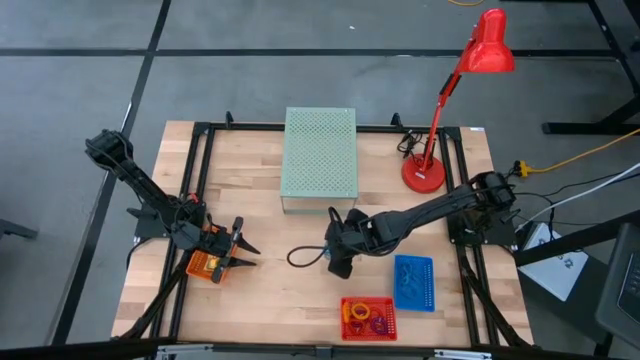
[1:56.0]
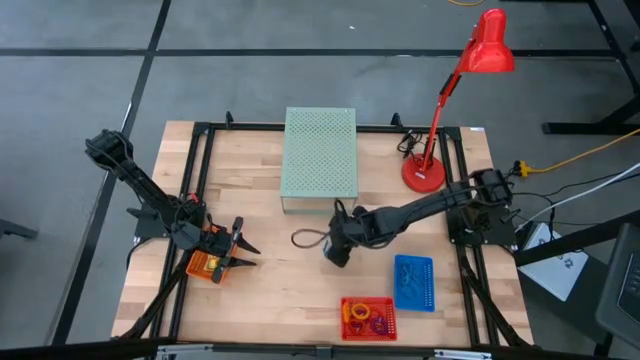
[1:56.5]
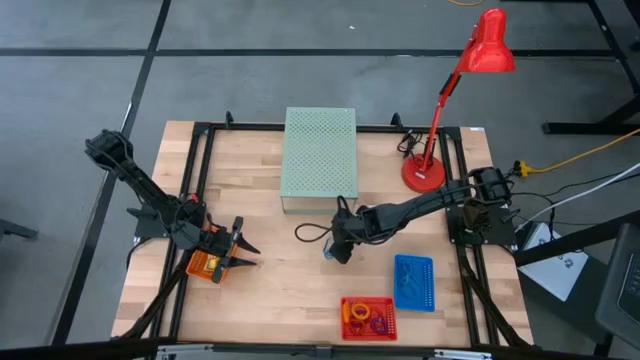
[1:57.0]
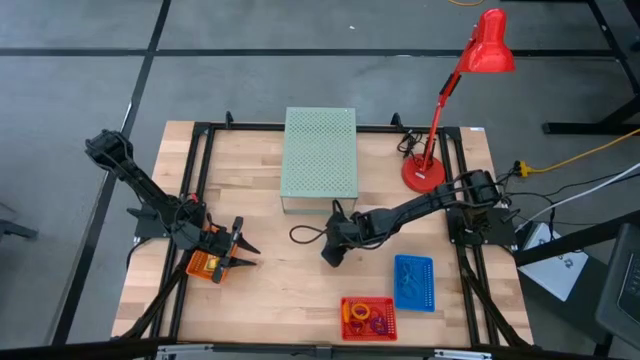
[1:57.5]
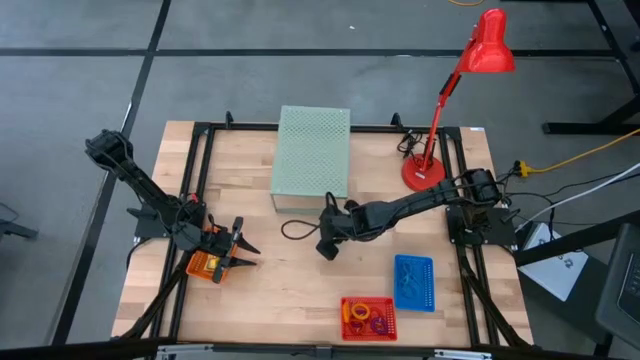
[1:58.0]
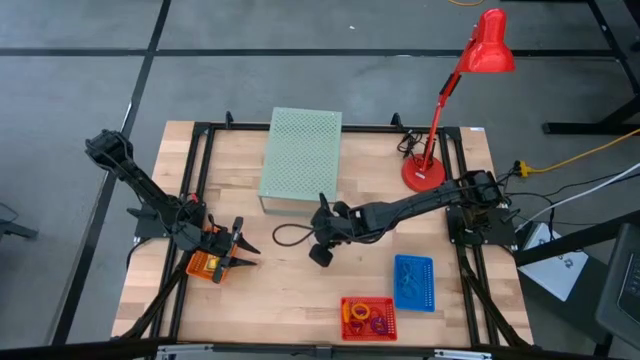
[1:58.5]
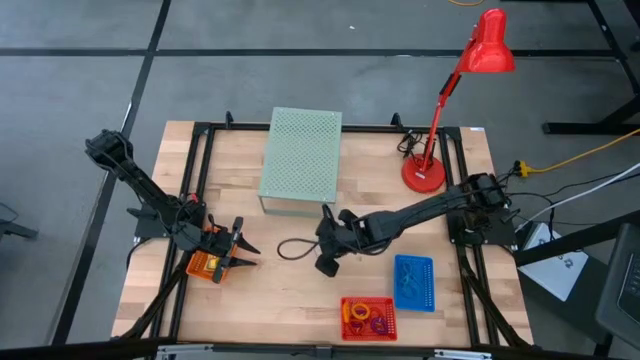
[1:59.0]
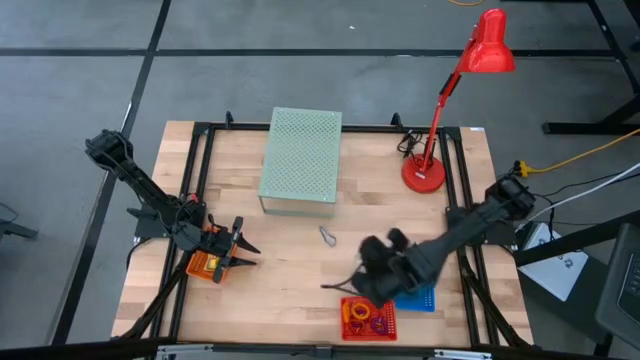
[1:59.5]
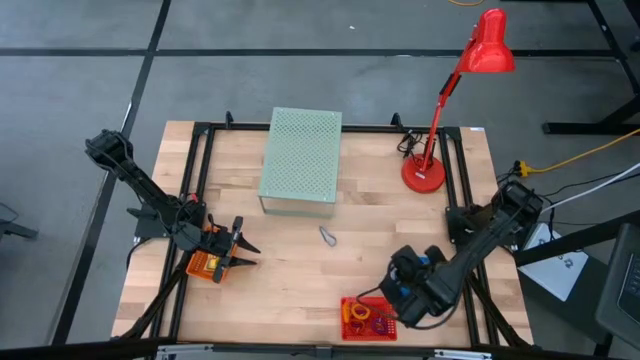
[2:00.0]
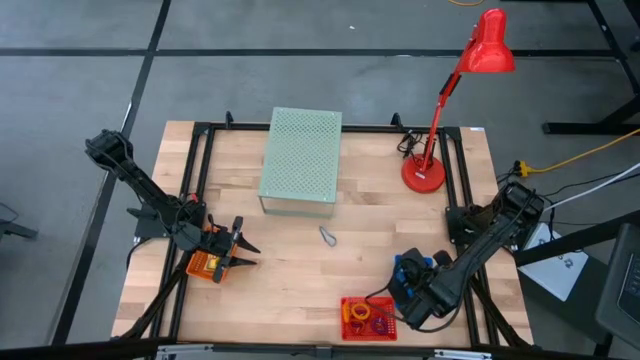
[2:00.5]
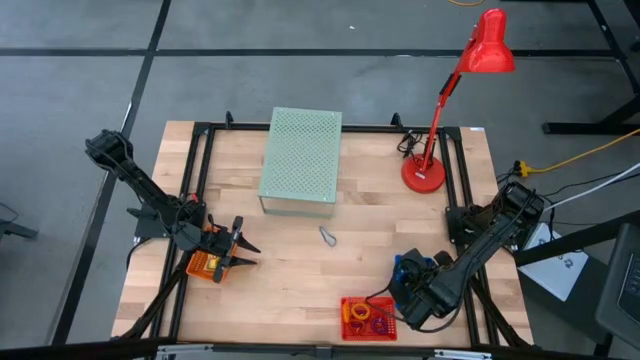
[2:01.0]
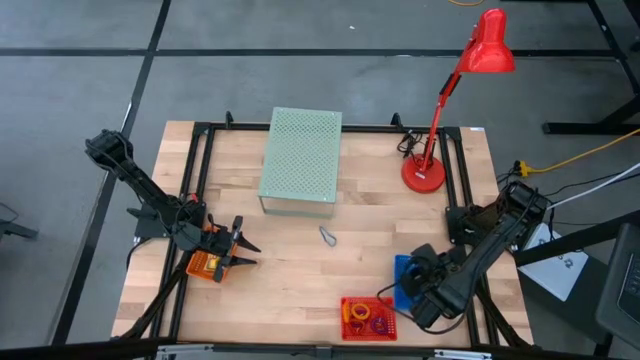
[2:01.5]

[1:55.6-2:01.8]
Task: Pick & Place Office Desk Supplies
Put the blue rubber band into the blue bin

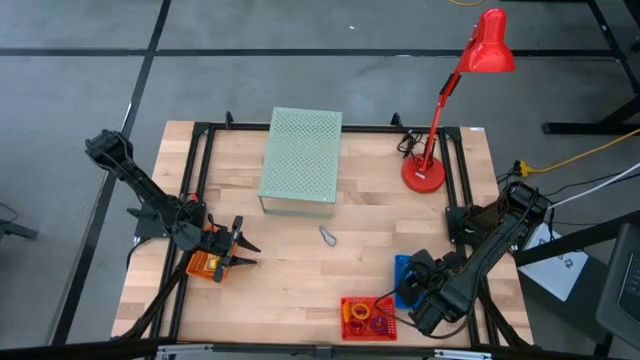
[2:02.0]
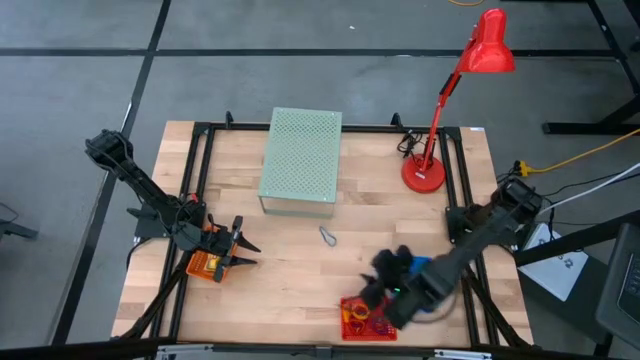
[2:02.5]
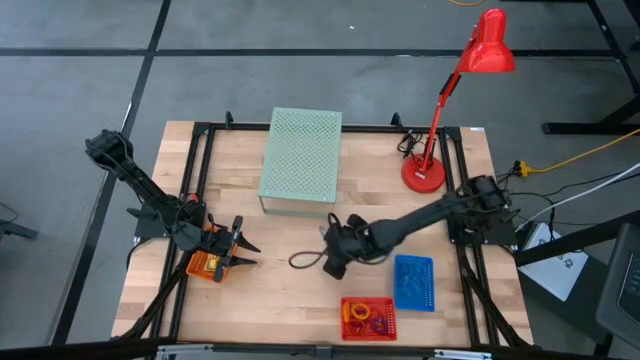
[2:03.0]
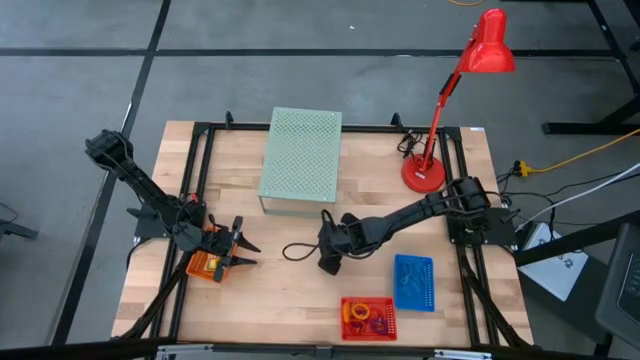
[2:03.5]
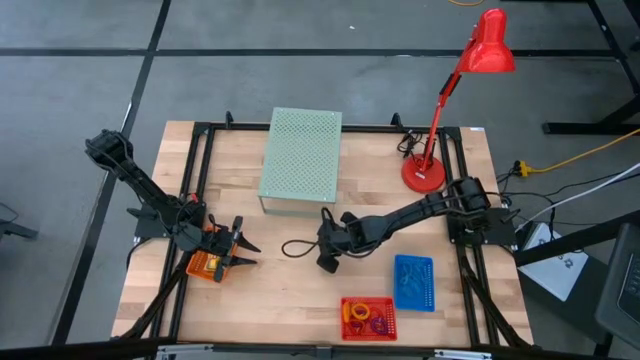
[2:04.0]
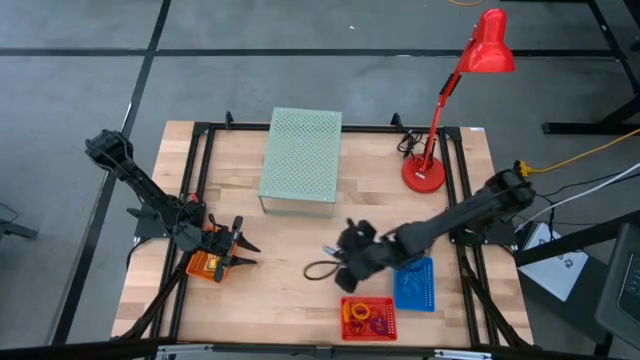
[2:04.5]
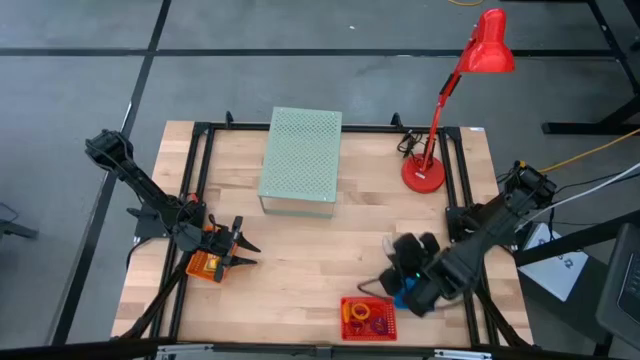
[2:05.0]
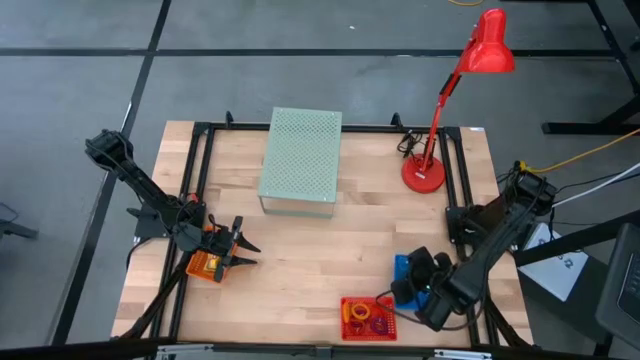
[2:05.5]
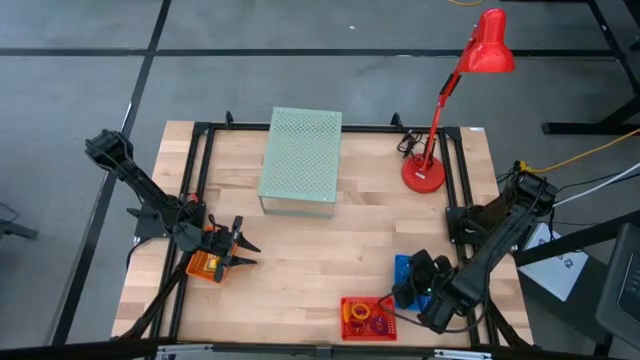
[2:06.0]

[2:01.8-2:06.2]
Put the blue rubber band into the blue bin

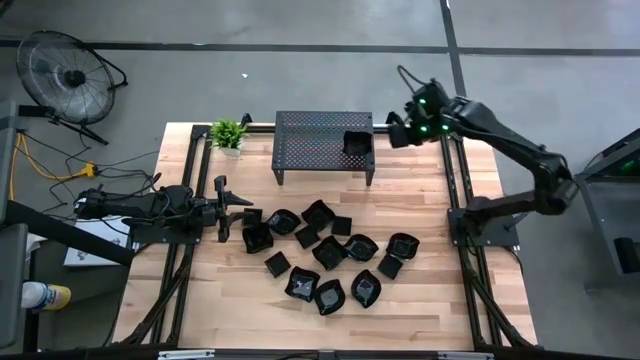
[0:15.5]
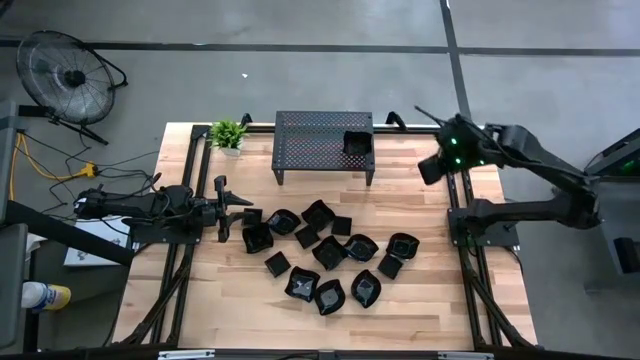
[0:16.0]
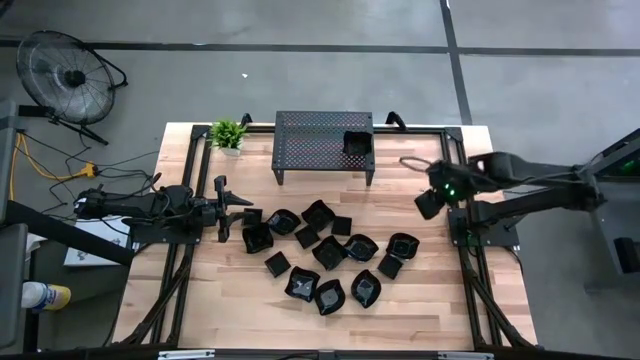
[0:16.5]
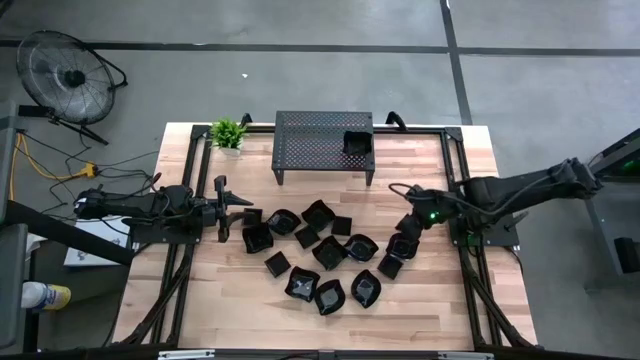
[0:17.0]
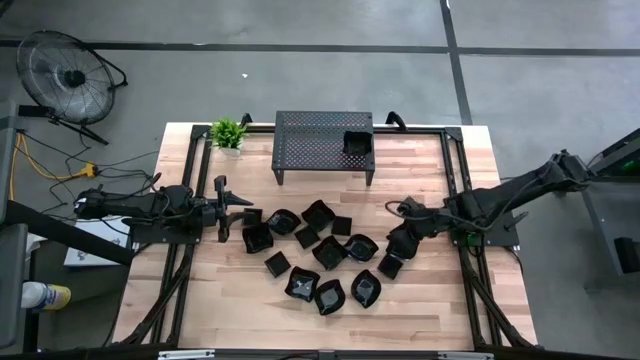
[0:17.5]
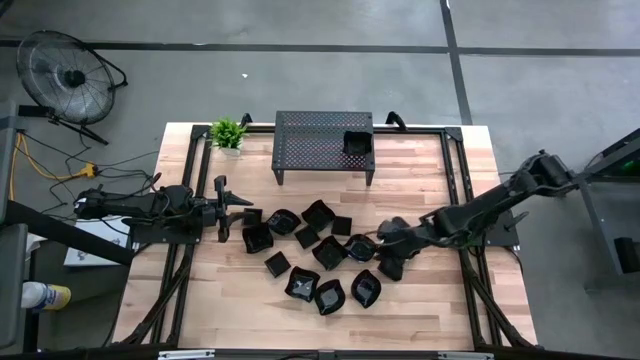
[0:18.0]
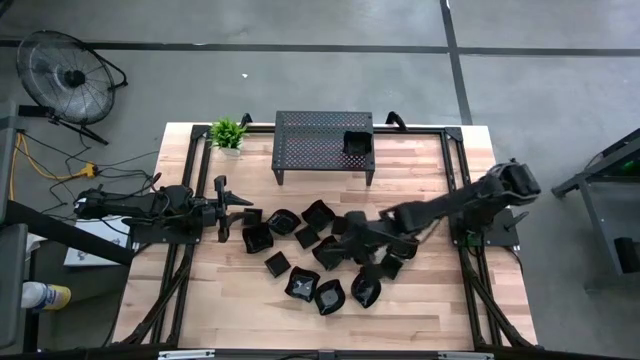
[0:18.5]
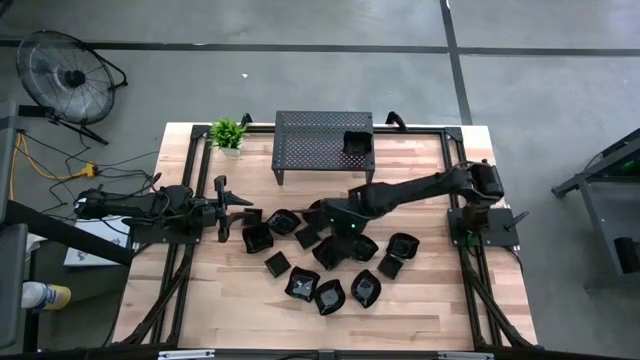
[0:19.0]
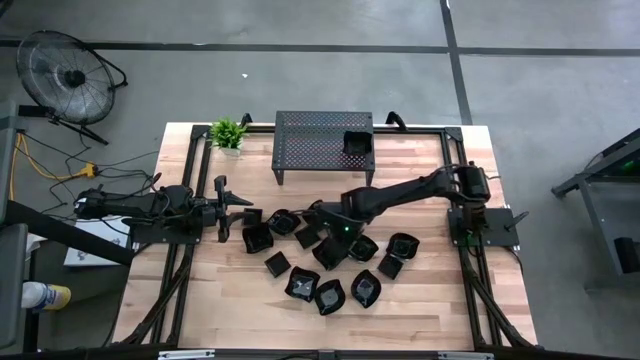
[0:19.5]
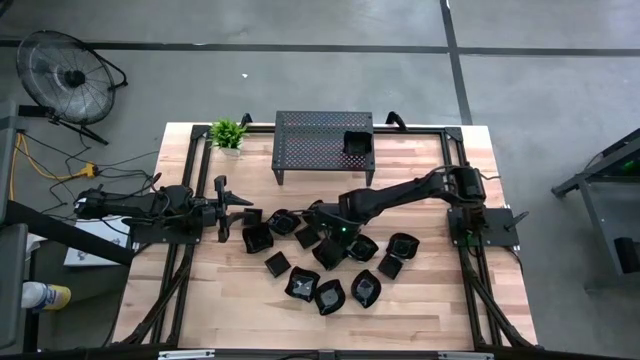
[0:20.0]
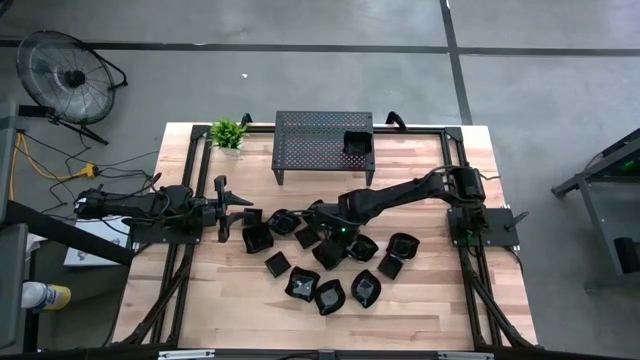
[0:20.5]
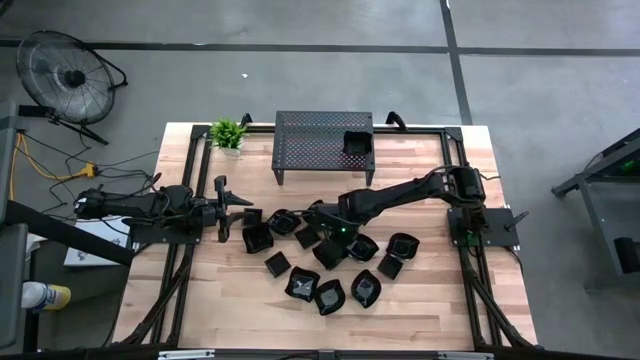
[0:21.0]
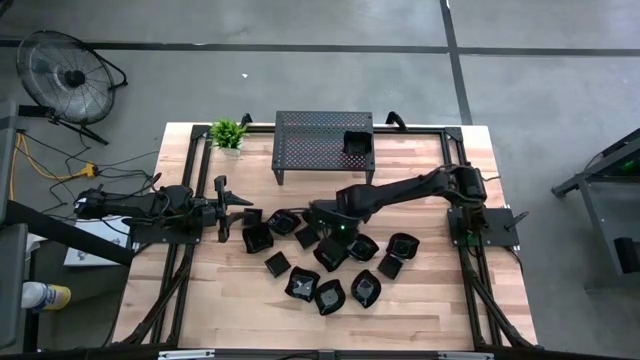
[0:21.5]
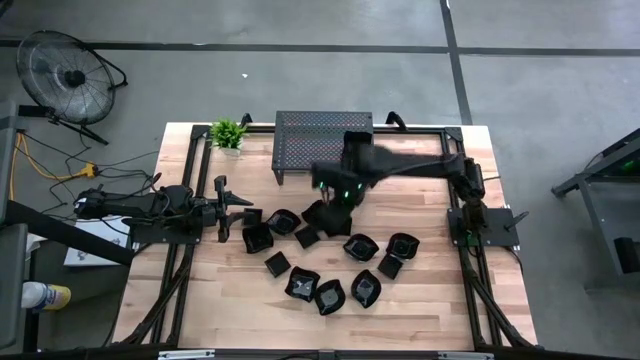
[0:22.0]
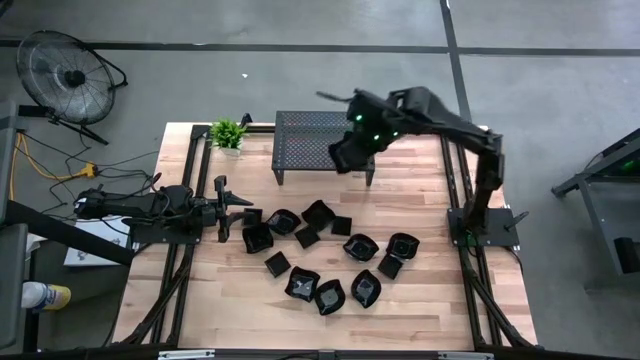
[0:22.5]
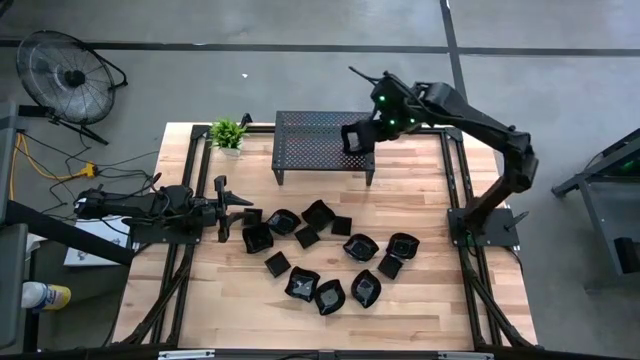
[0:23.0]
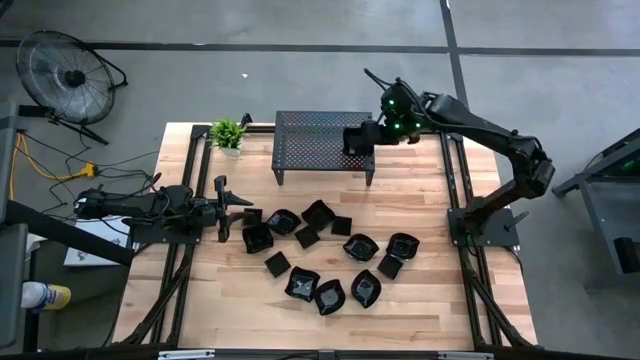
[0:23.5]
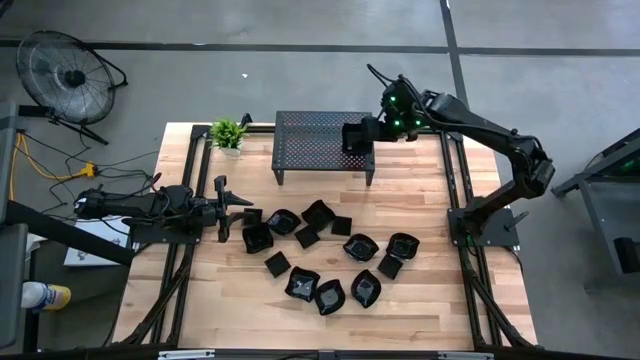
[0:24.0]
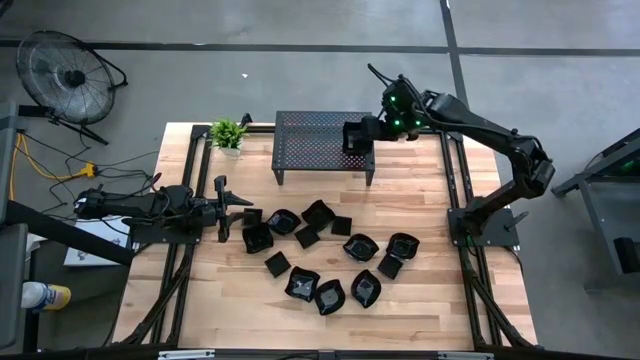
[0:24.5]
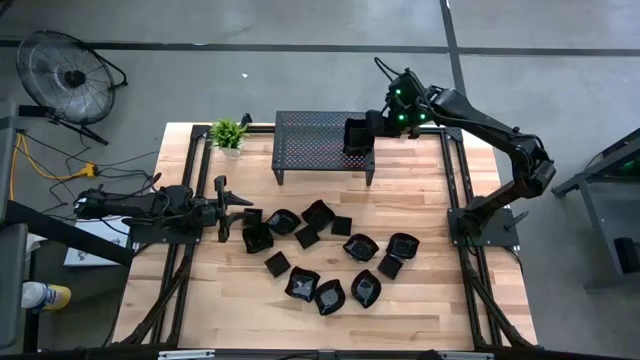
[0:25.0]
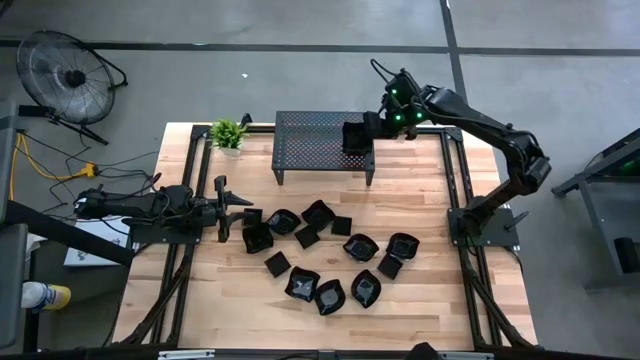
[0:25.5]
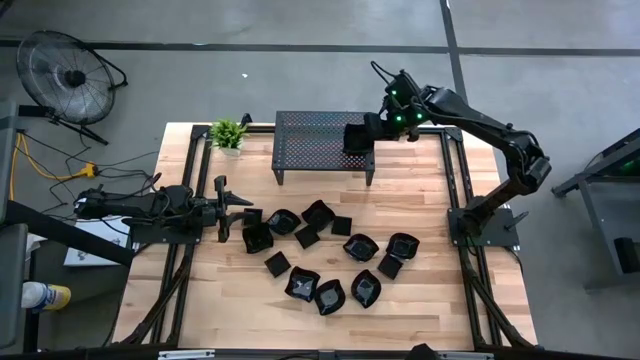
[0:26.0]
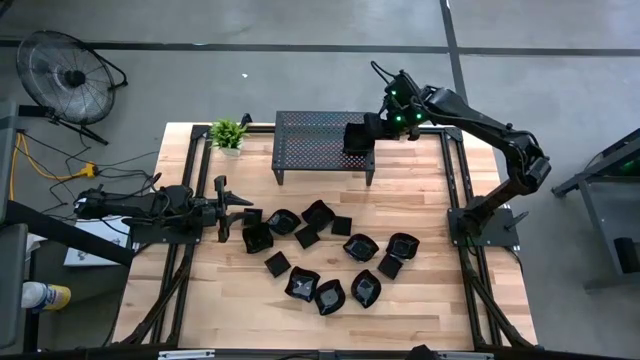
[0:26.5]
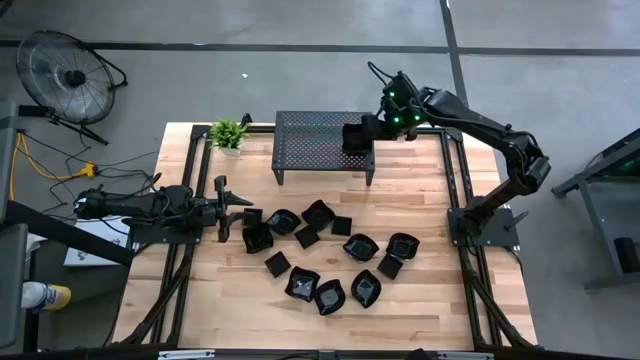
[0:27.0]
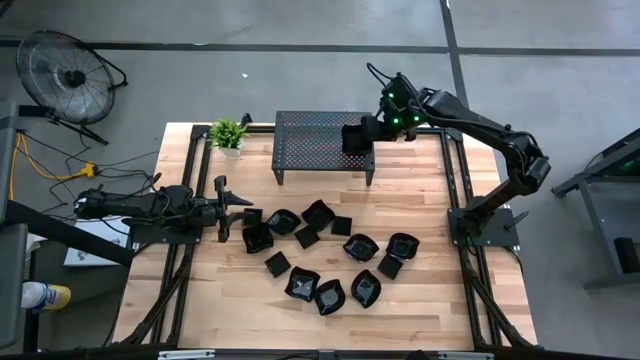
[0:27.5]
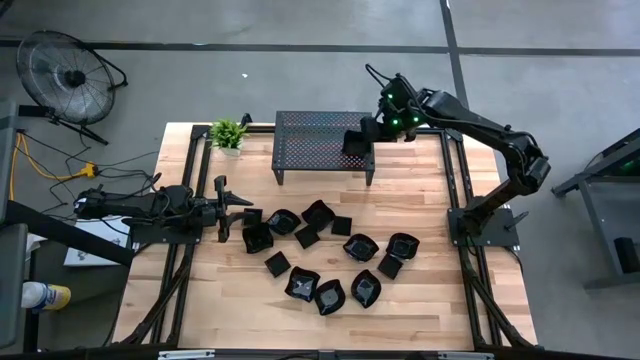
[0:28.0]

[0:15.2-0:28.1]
Task: Pick & Place Mini shaped plates
Stack the distorted square plate on top of the distorted square plate on the shelf
